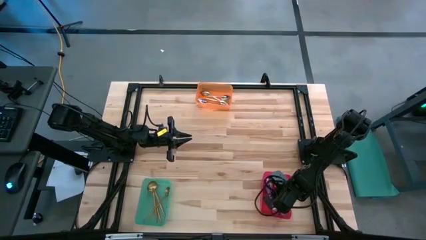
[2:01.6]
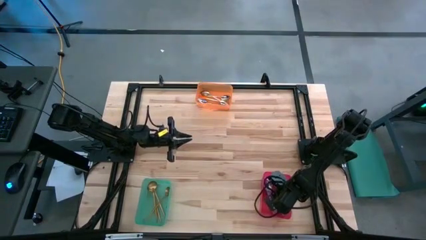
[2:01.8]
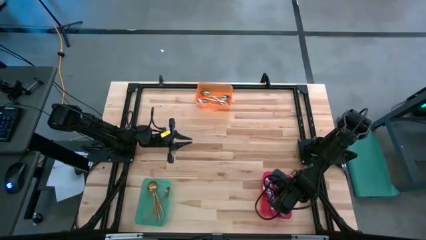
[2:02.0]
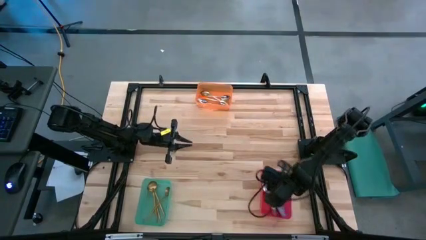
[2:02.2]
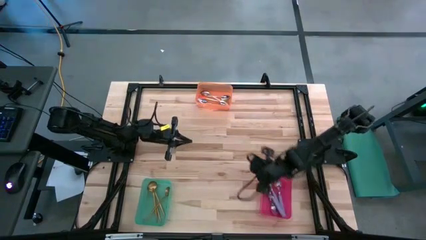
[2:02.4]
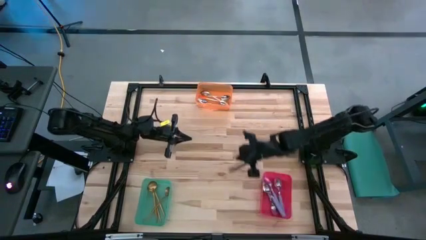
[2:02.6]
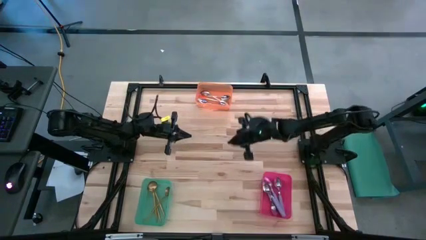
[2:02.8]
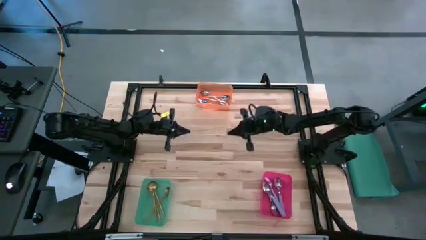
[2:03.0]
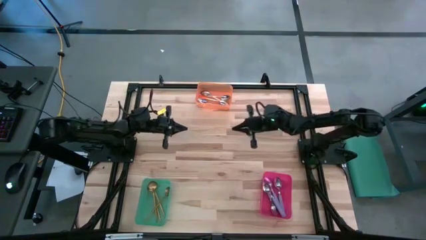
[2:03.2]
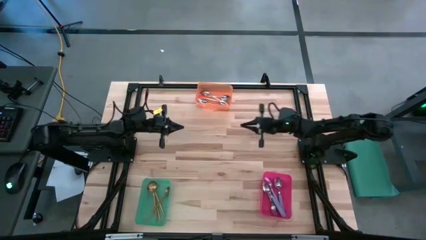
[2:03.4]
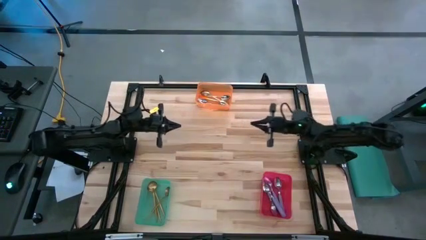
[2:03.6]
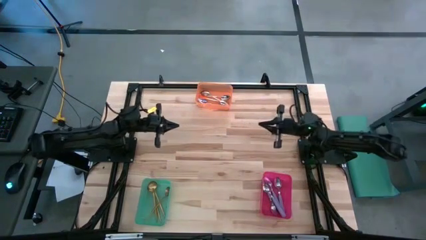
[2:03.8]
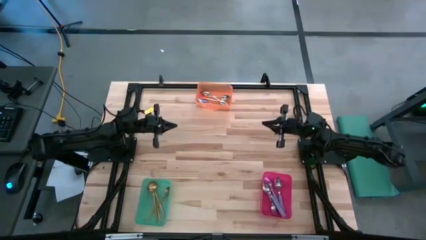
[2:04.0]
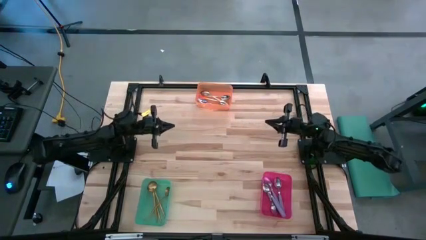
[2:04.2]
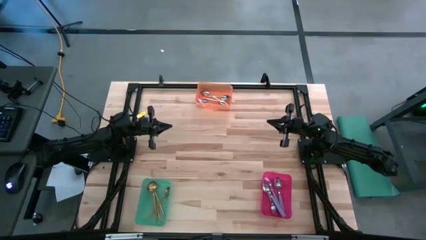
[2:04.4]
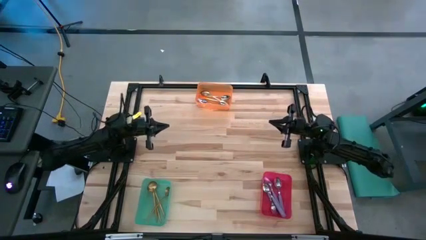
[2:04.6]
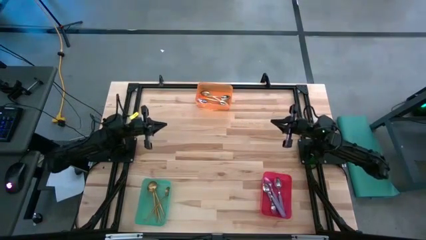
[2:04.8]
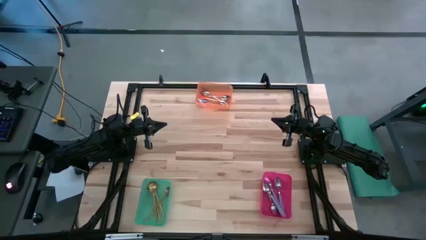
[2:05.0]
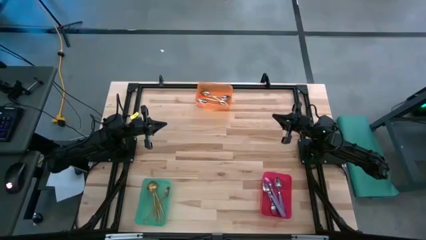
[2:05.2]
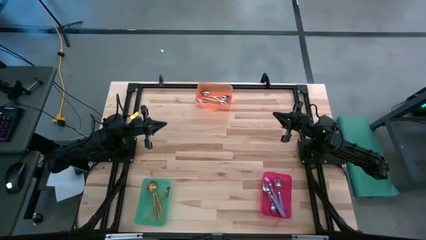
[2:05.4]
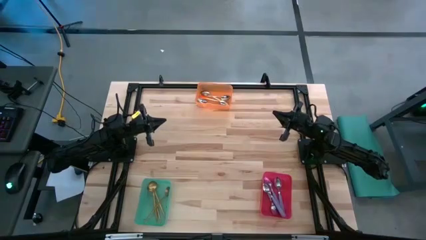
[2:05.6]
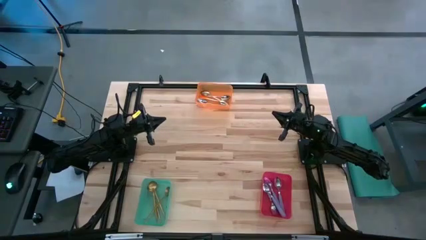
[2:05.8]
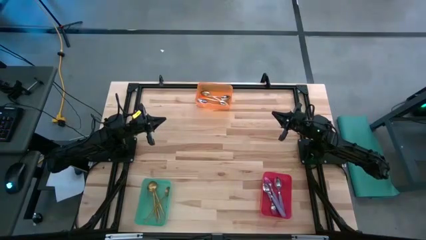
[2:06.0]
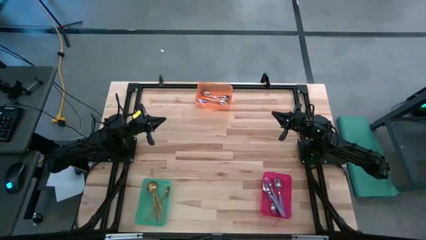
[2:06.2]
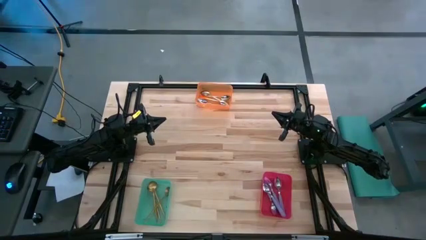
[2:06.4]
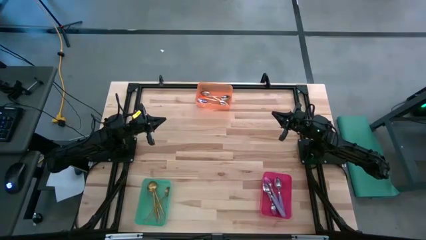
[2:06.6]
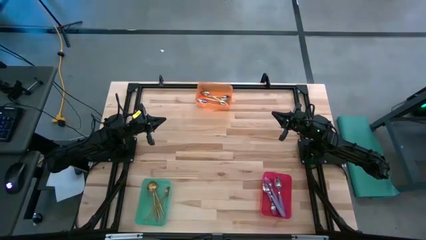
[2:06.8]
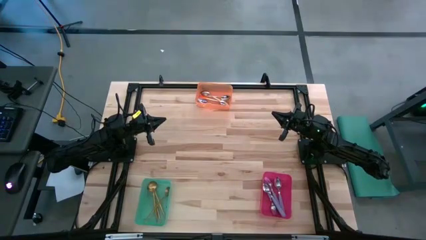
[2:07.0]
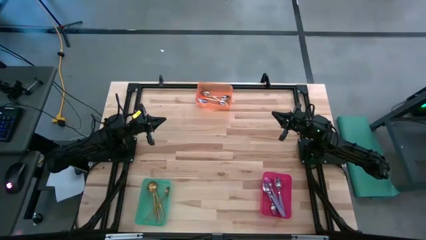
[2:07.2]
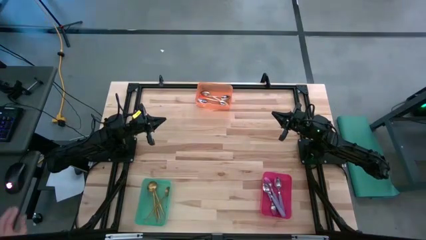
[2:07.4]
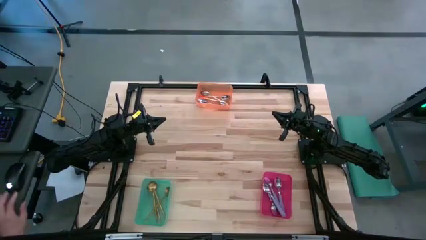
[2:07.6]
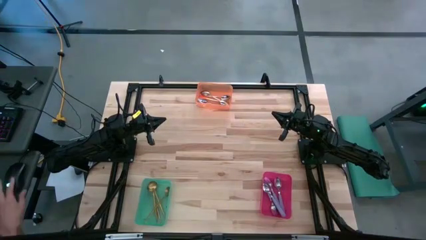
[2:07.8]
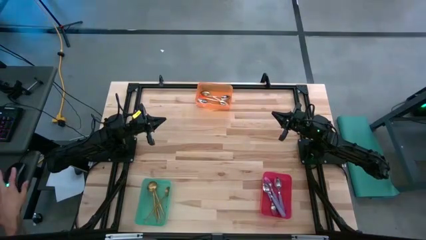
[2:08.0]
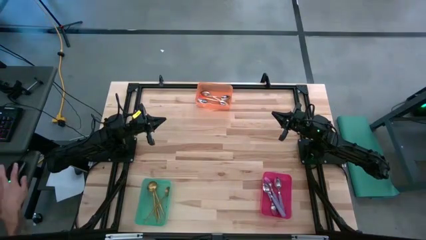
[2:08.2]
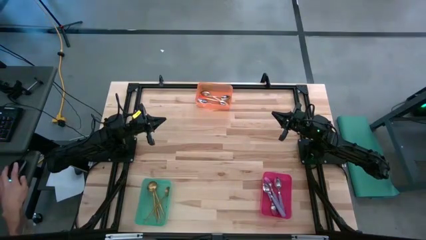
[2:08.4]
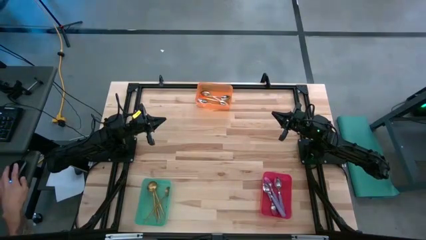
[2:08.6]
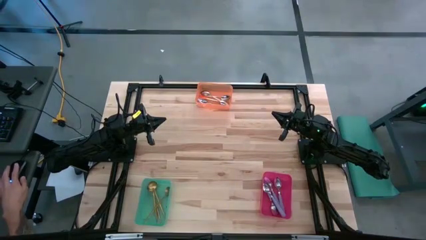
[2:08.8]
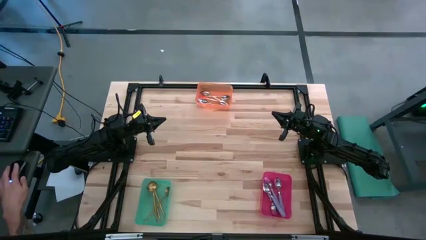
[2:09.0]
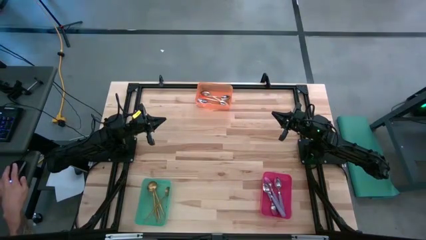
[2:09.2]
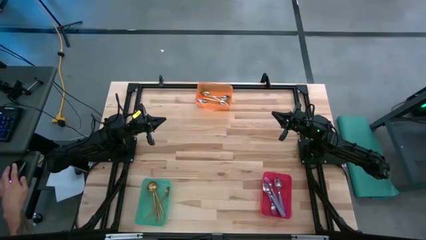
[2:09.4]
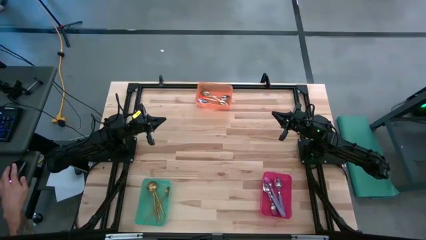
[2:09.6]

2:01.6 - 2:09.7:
Task: Sort silverware by color (type)
Return to Home Position

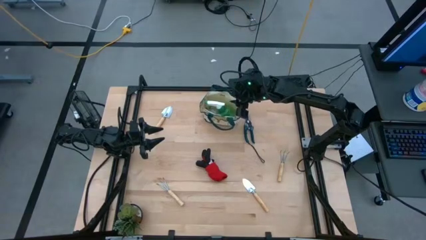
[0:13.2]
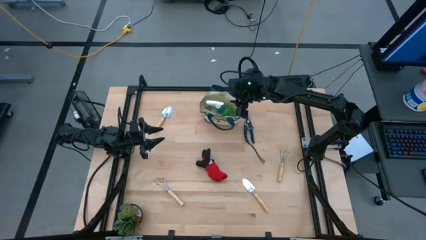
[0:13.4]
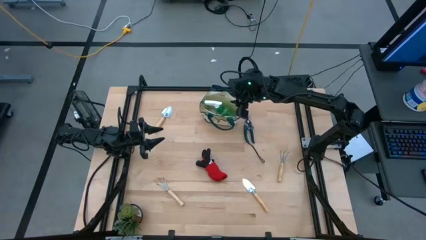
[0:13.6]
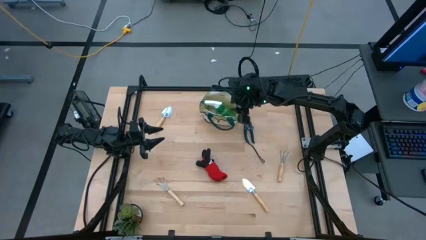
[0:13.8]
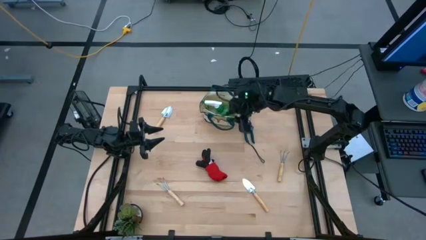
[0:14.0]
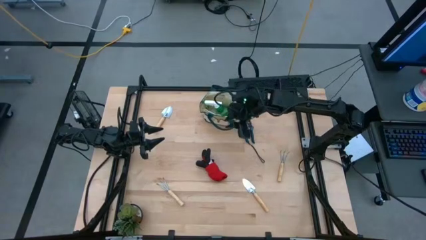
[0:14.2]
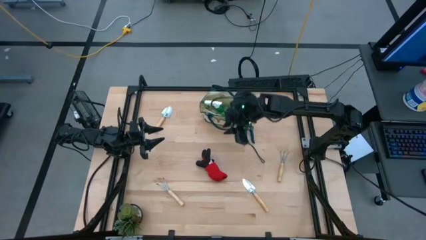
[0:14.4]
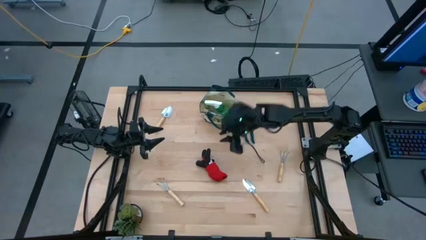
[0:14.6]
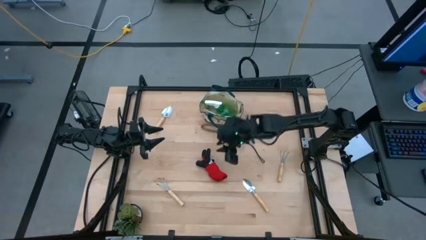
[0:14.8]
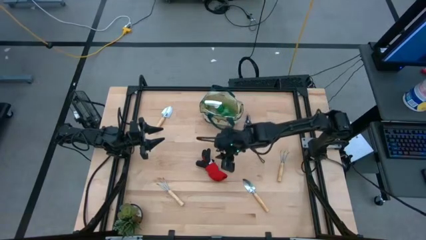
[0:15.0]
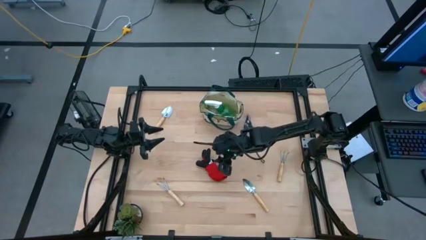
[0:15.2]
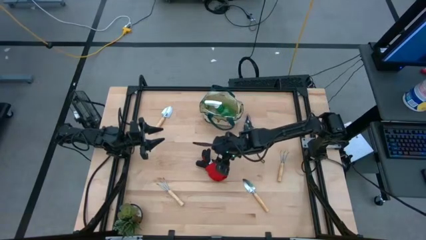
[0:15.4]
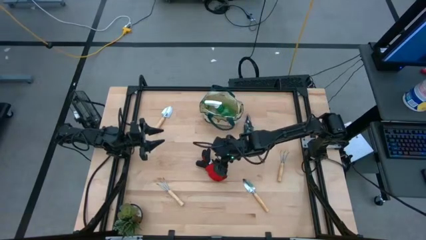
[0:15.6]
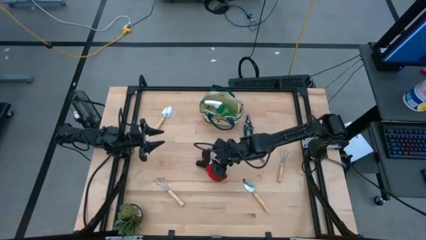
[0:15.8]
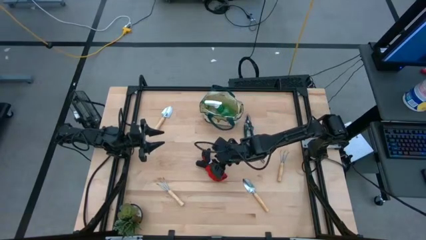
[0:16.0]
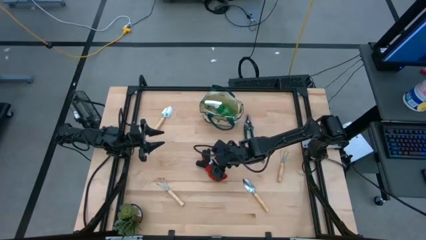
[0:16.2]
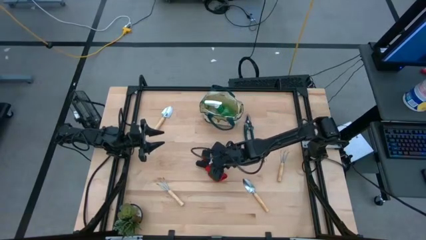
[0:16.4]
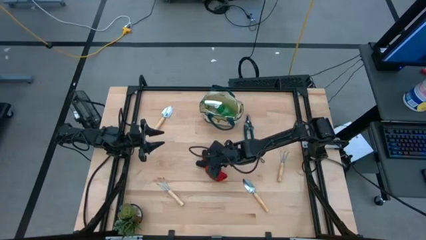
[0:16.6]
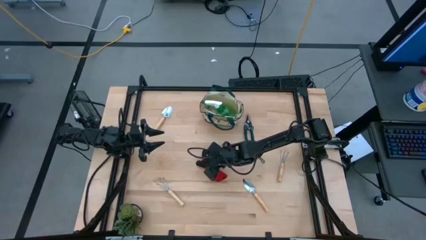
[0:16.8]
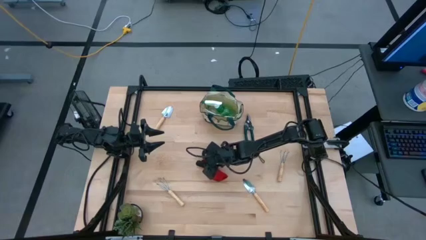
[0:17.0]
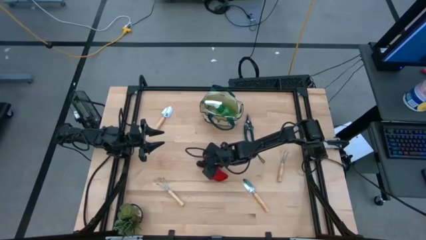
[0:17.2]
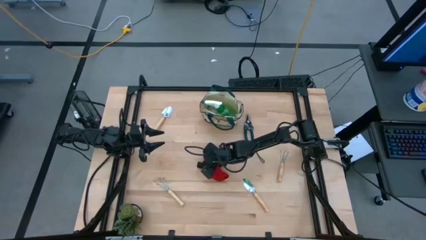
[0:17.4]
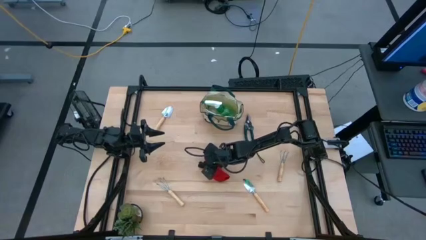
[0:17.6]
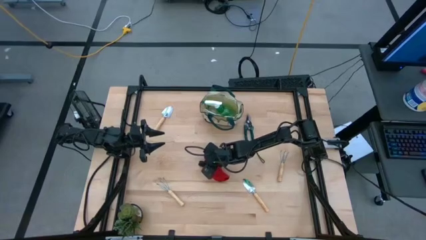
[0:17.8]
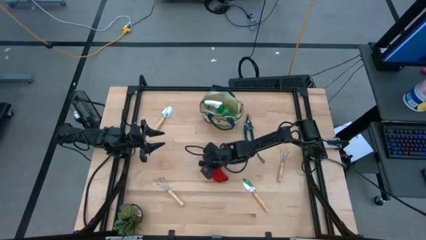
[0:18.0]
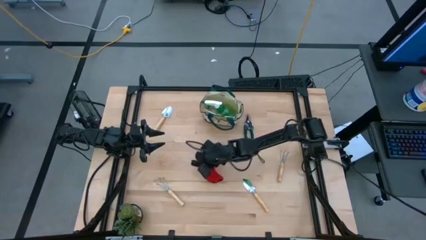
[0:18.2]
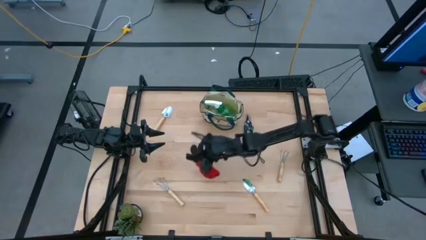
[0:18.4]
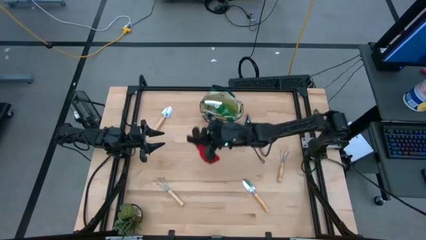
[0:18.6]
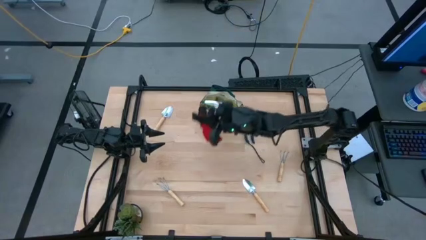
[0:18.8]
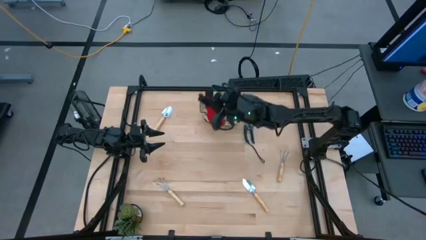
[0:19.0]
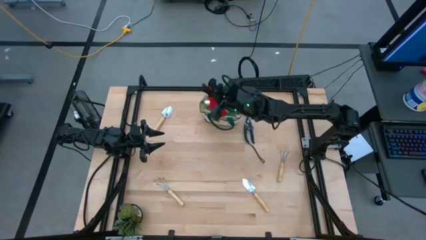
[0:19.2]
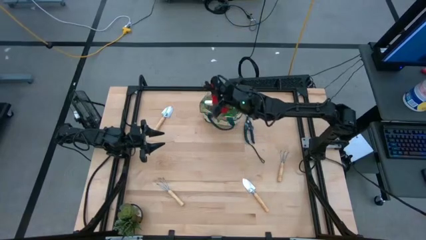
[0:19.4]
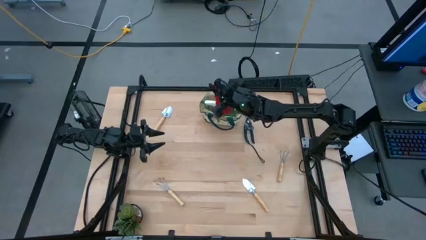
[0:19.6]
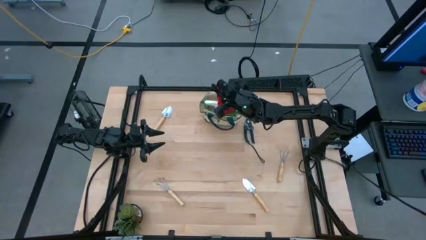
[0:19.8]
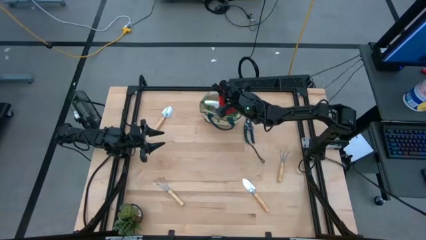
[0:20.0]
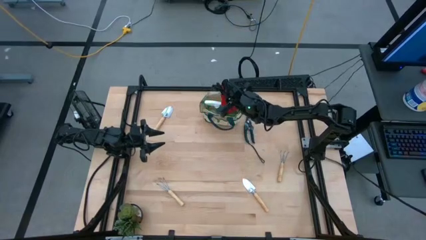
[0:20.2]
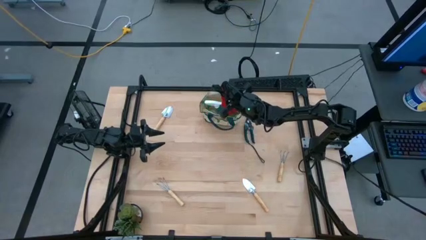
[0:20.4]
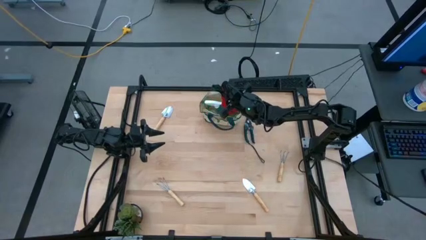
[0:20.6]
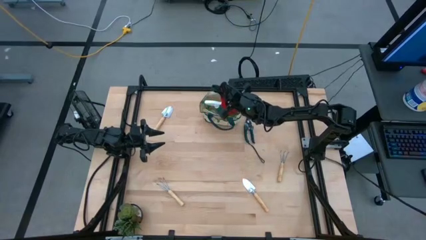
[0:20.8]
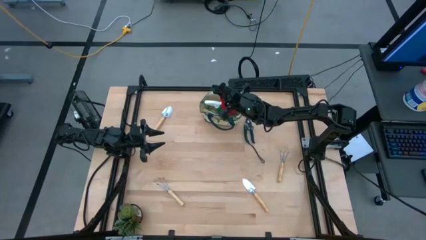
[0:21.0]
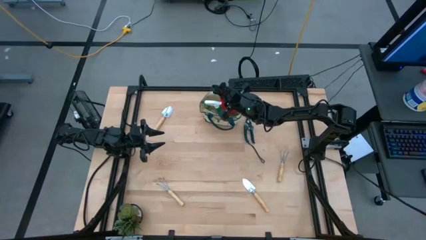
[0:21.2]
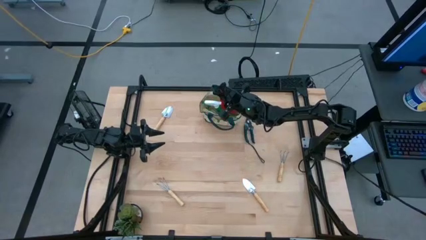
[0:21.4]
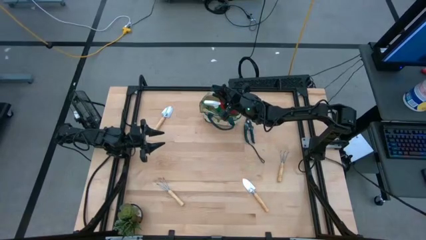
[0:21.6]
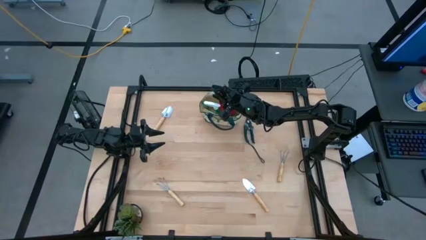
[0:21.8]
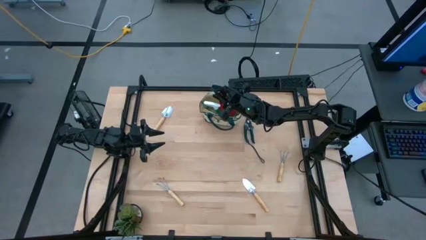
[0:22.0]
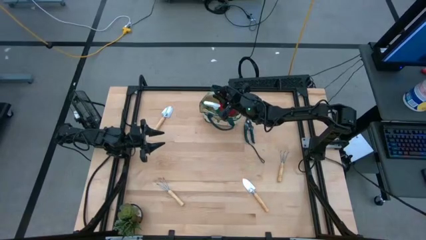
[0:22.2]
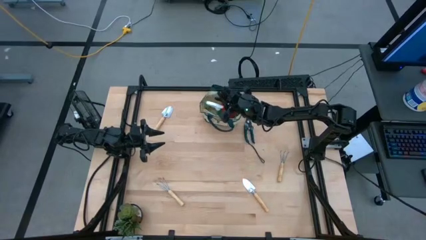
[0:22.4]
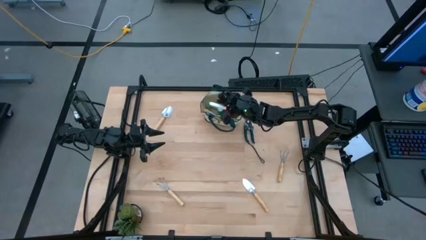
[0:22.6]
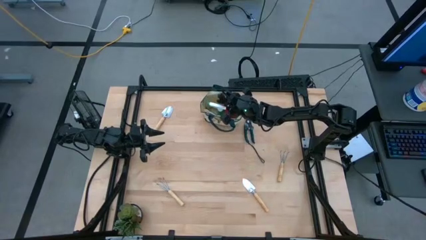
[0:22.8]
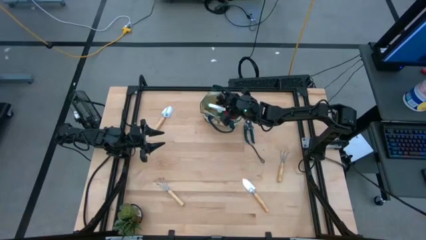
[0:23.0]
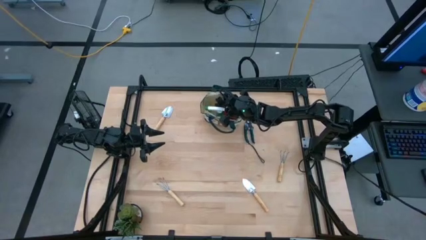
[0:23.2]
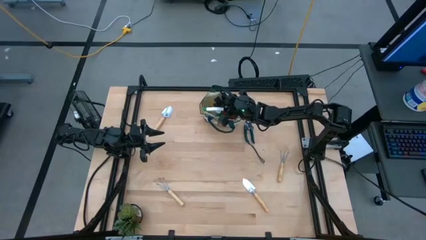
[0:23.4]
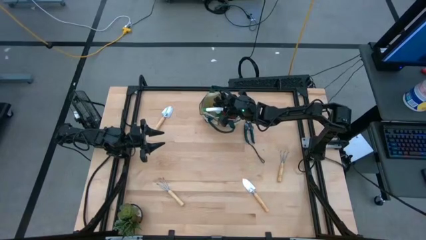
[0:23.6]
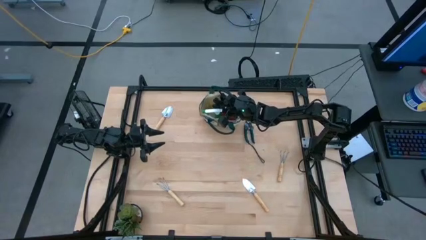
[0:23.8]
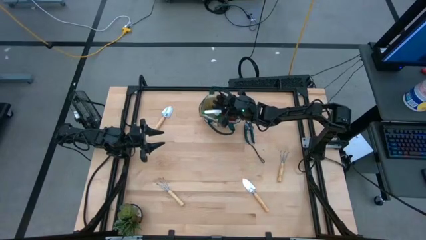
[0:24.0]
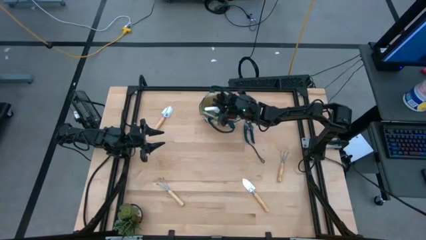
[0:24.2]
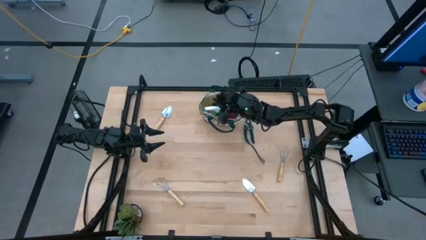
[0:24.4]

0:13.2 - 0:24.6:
Task: Pick & Place Garden tools in Gardening bag
Put the red gloves into the green gardening bag
